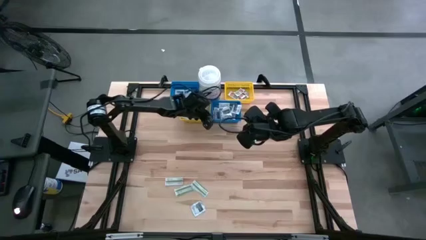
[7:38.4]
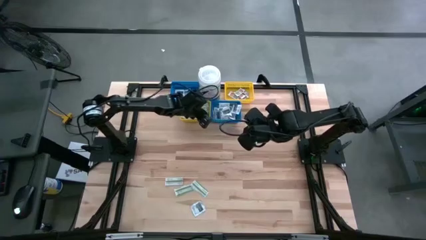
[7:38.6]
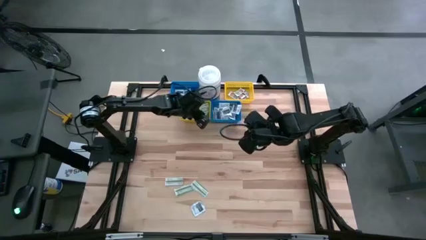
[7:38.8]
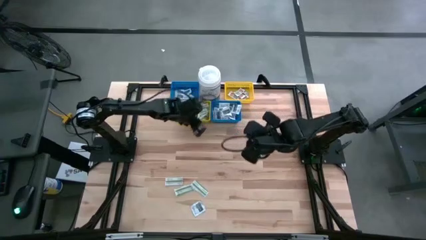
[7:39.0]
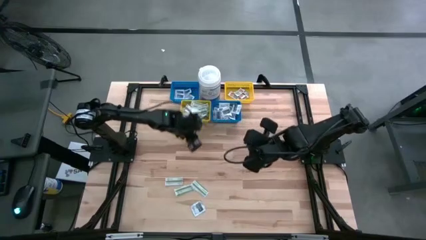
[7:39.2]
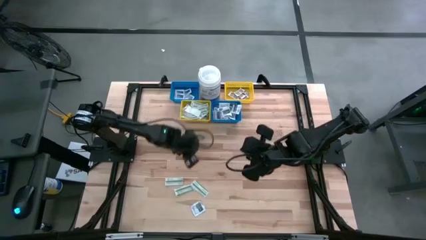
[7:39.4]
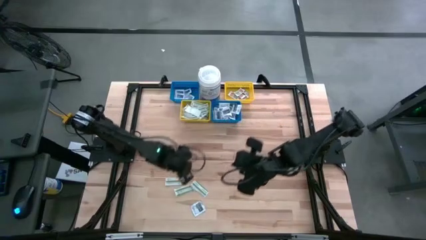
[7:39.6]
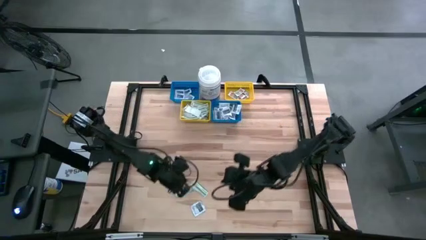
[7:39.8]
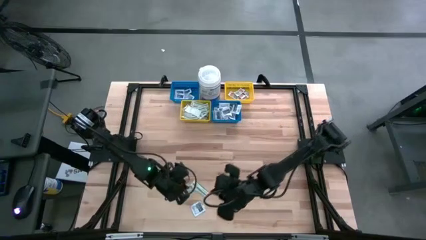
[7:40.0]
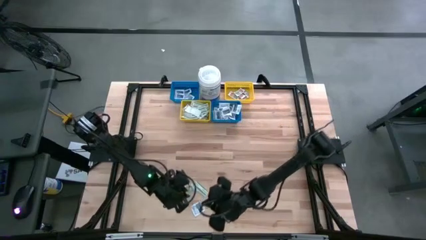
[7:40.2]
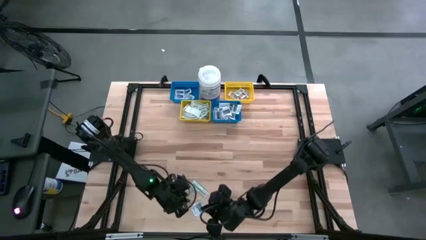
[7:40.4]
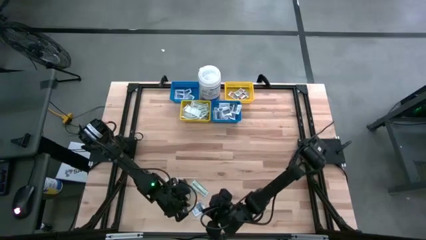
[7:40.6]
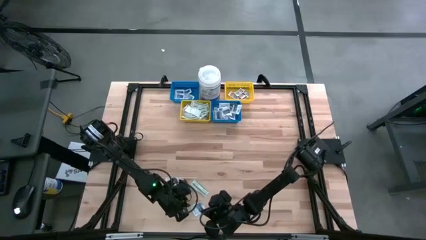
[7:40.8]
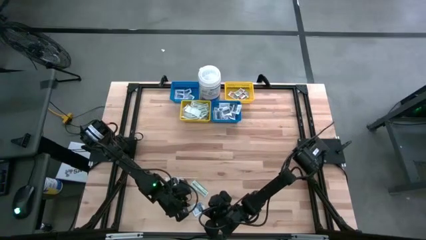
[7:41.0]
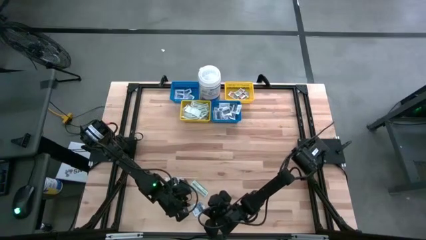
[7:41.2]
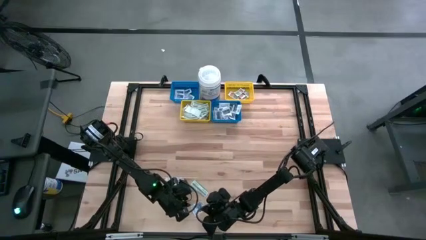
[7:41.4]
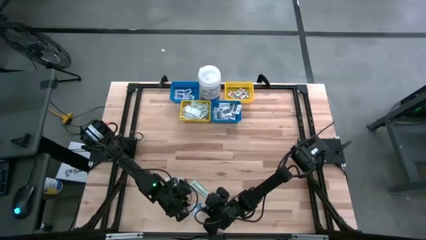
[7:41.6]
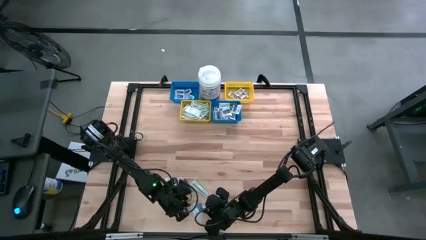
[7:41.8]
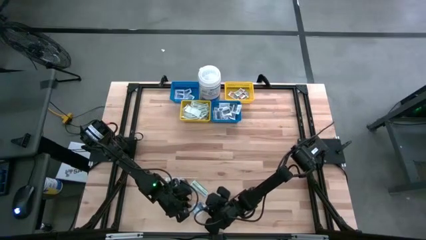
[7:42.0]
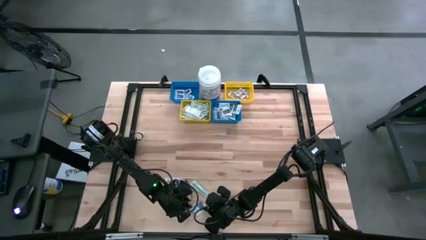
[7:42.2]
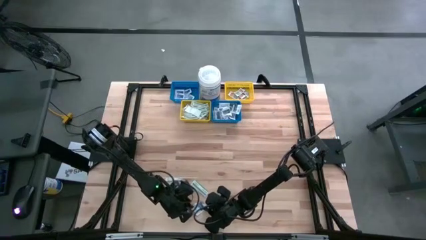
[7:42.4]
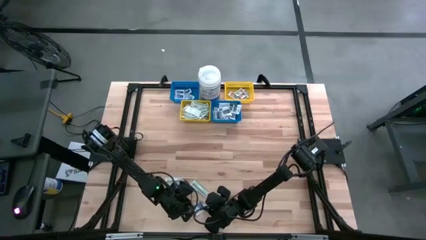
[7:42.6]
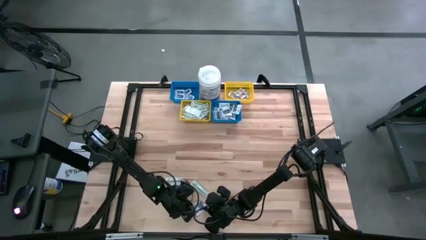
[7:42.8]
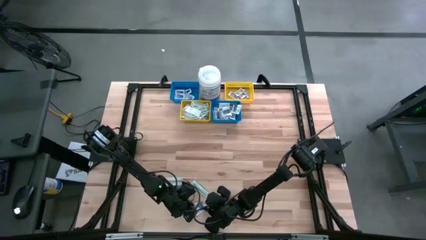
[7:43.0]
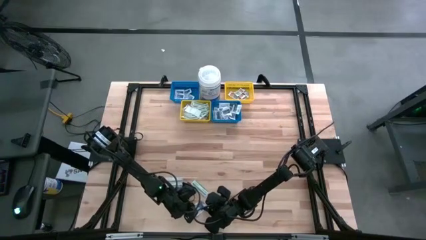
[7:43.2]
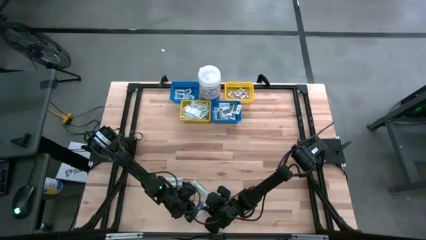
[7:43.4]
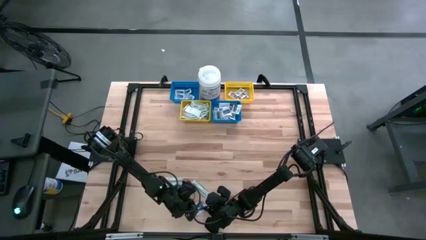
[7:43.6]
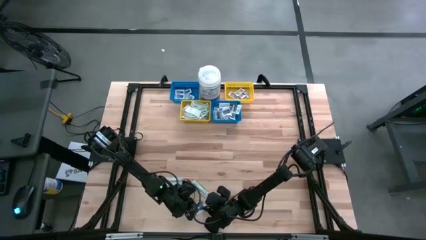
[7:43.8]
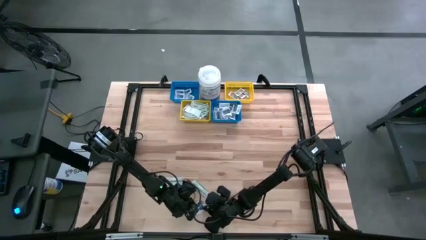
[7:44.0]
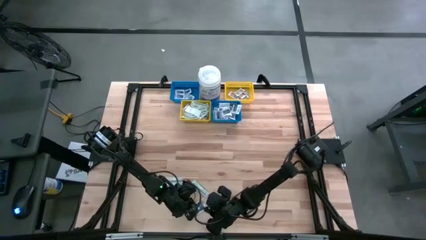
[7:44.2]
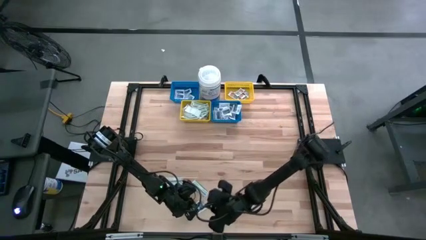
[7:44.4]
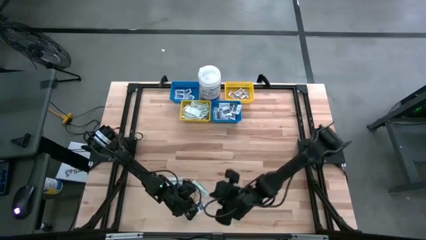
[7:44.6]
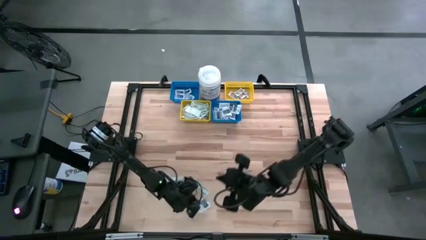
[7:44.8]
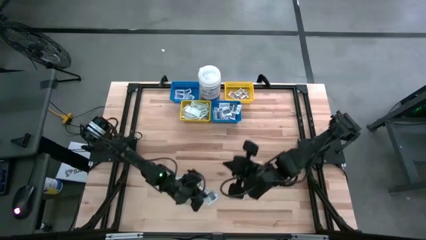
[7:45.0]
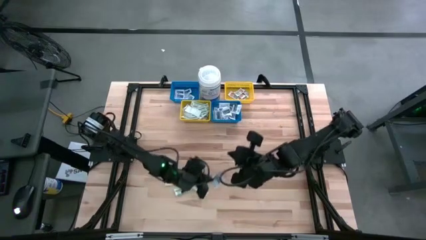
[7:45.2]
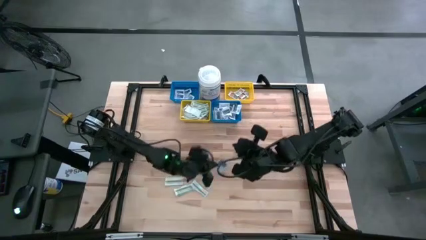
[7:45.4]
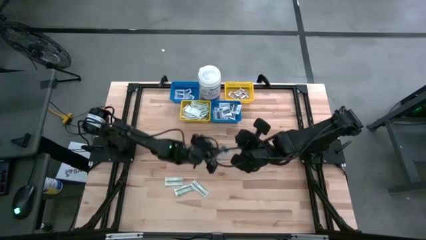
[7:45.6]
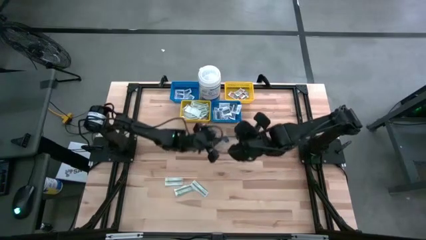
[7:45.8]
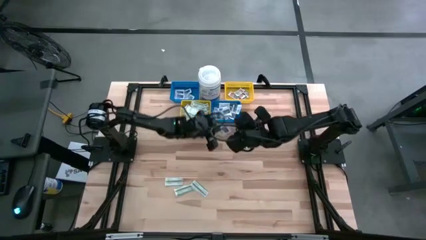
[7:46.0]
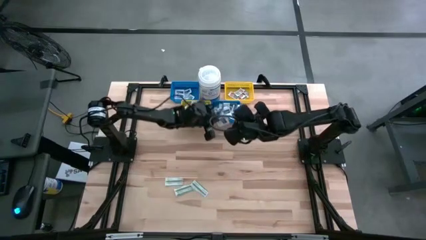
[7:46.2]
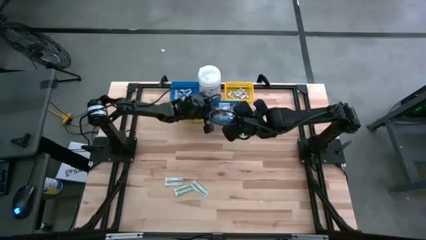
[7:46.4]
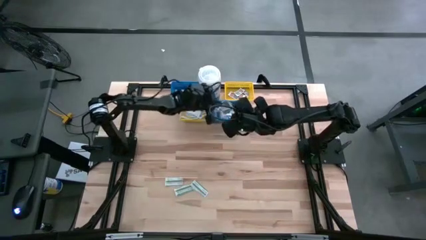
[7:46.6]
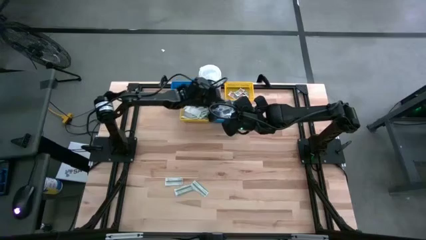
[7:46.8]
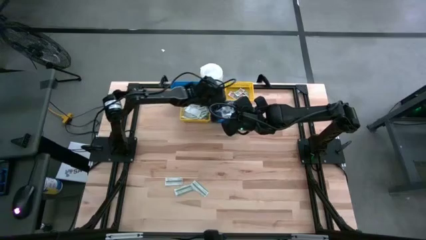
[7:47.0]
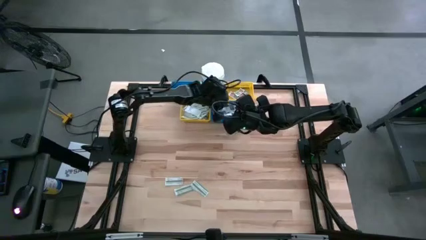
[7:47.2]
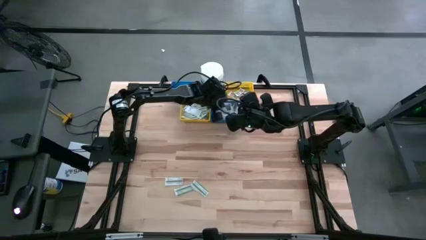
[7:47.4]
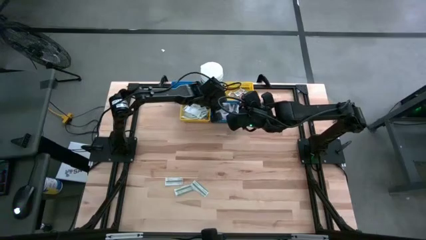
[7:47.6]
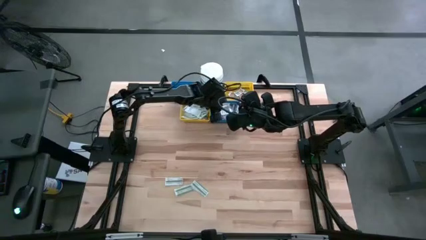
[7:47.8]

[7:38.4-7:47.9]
Task: Pick & Place First Aid Supplies
Put the black towelette pack into the right blue bin

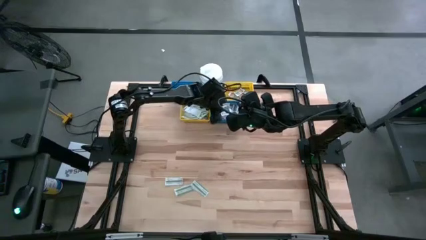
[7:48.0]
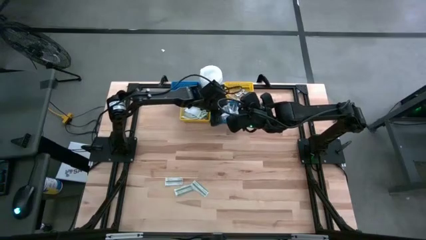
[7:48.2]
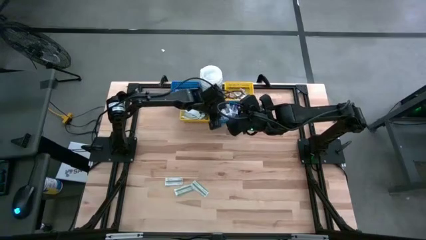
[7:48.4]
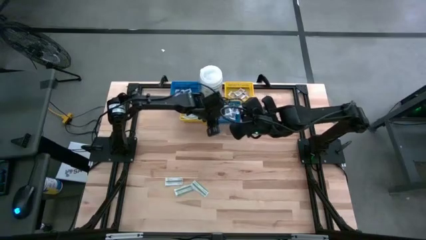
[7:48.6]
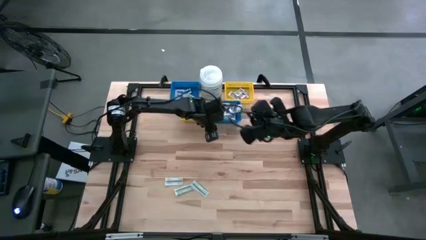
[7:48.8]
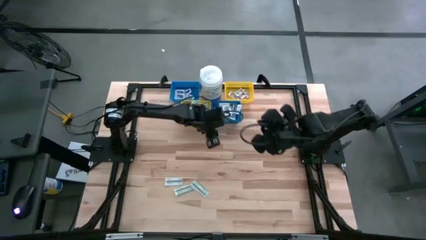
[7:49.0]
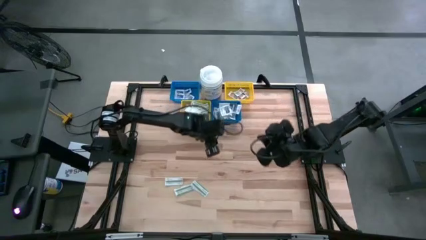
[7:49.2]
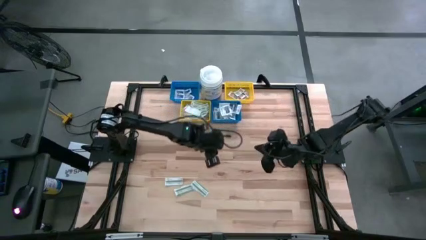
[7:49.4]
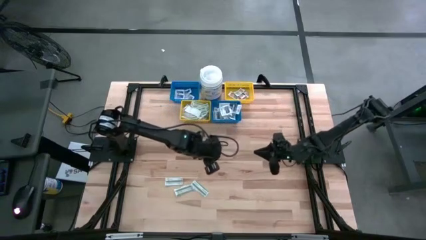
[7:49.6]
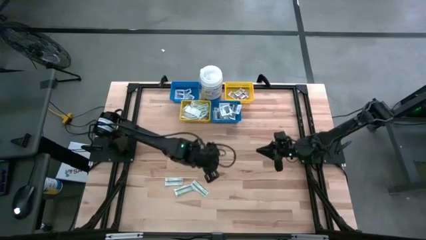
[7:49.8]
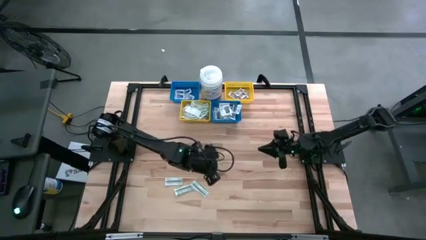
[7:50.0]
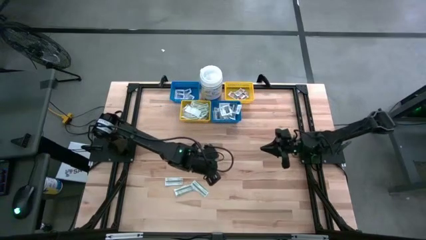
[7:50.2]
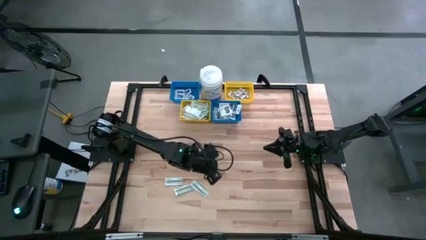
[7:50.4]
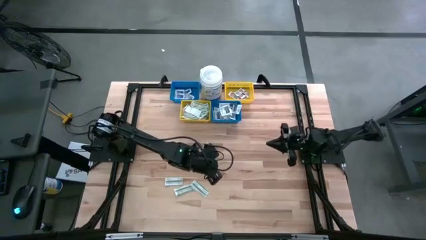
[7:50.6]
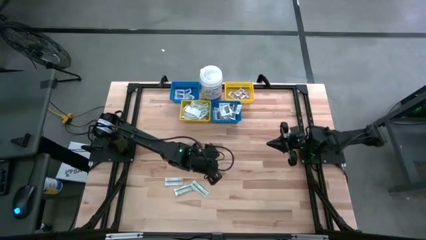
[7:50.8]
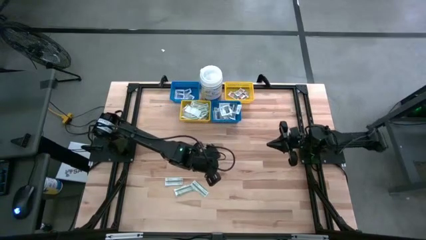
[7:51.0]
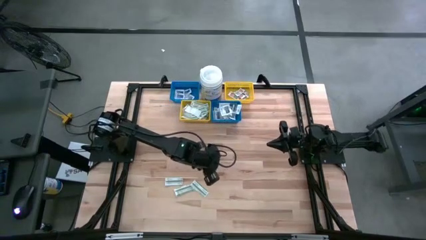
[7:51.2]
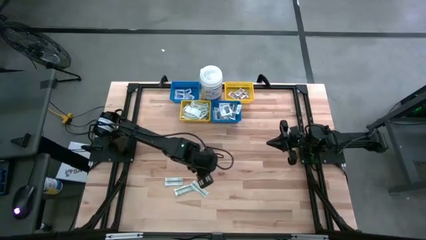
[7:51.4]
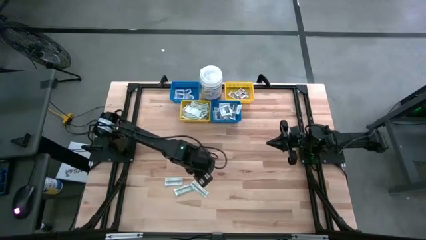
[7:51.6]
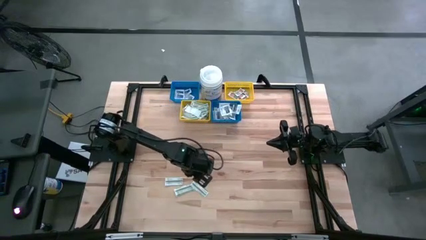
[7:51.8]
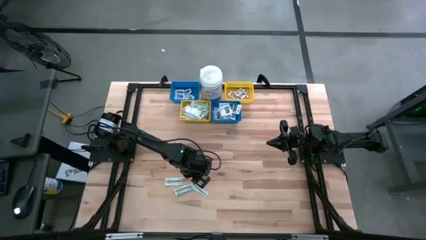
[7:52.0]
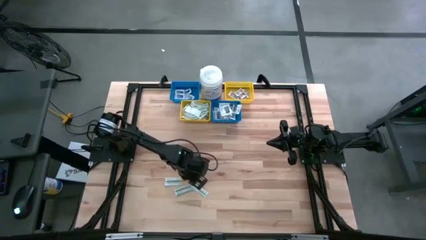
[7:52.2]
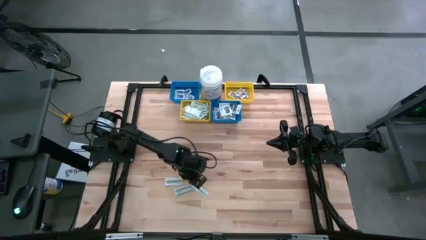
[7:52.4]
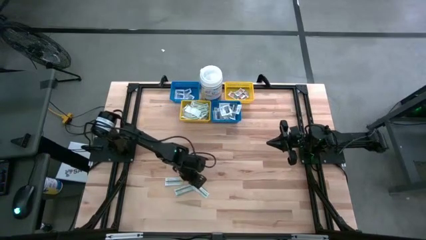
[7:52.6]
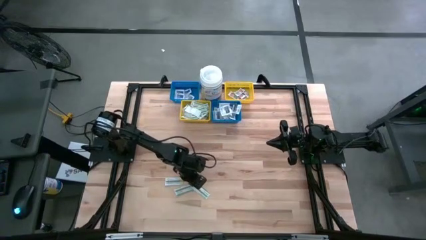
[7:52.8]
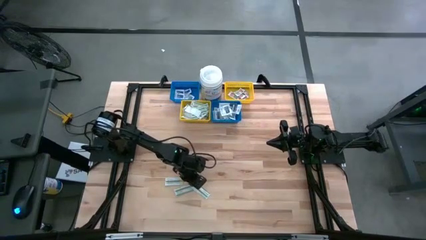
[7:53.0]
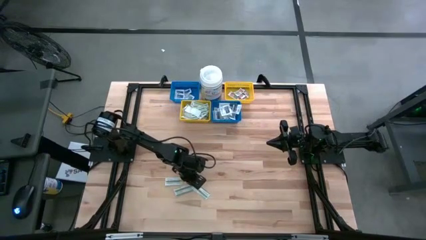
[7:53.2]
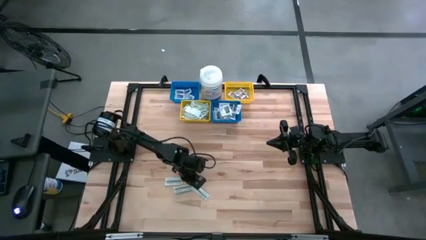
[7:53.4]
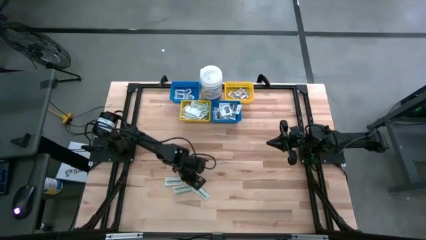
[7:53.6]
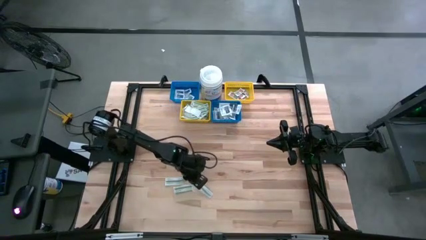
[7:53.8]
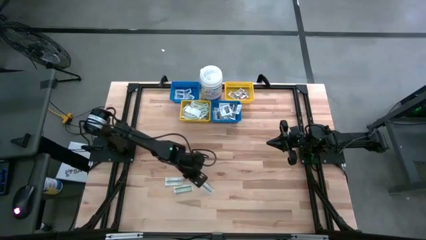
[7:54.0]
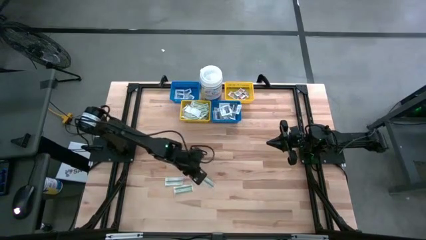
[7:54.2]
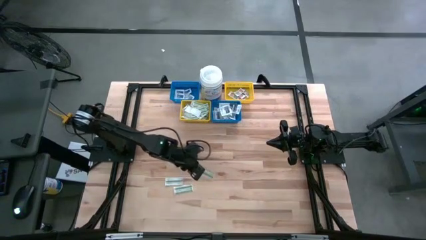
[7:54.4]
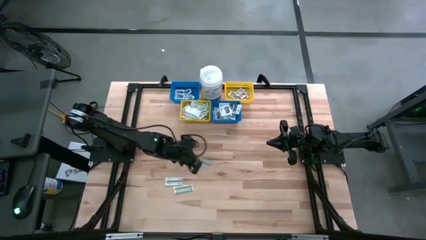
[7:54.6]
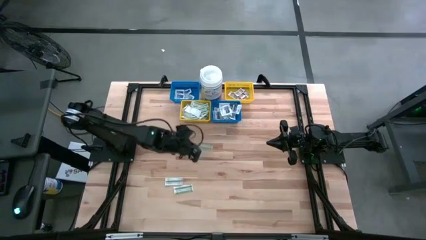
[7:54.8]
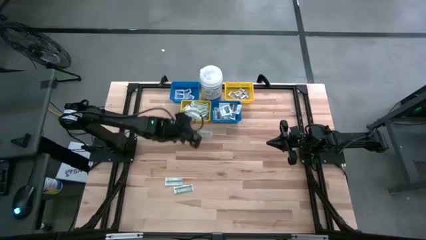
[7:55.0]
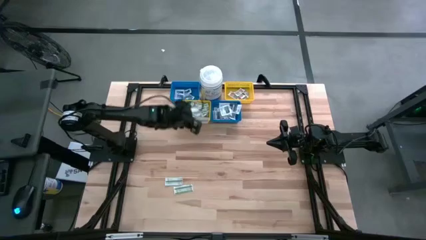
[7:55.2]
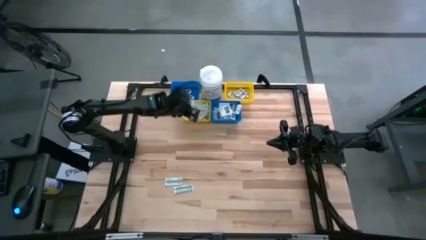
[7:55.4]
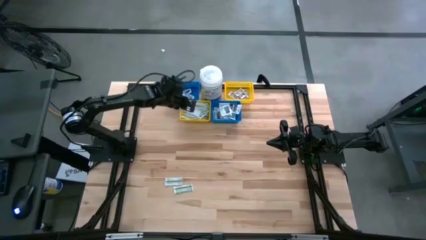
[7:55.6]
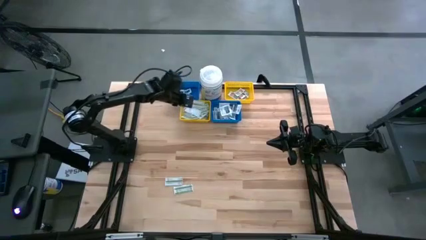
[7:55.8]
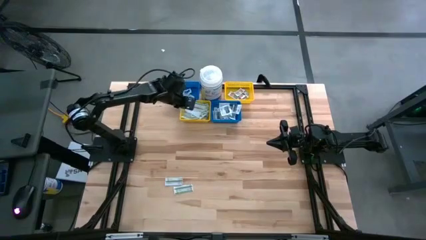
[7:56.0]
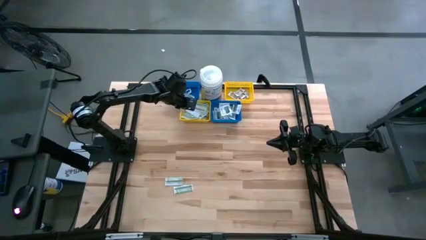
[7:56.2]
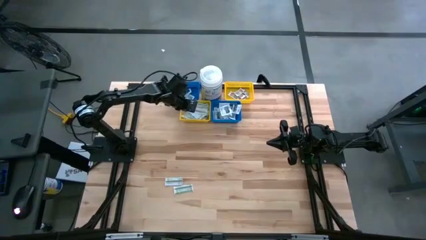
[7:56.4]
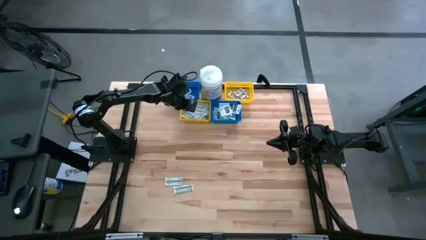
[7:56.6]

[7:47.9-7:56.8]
Put the green bandage pad into the left yellow bin
